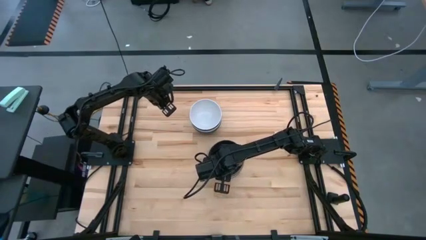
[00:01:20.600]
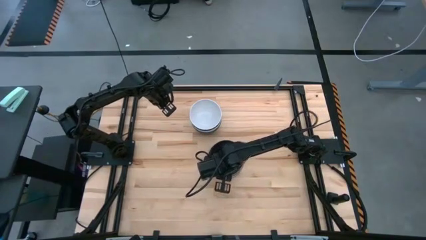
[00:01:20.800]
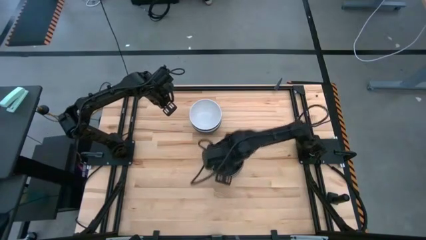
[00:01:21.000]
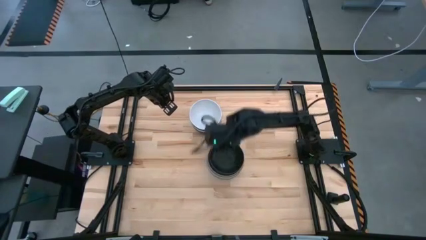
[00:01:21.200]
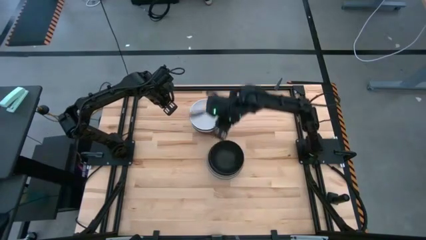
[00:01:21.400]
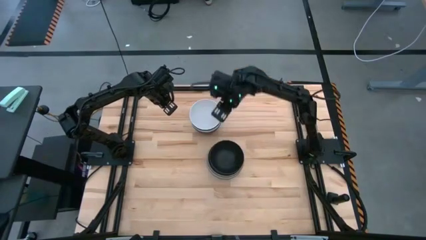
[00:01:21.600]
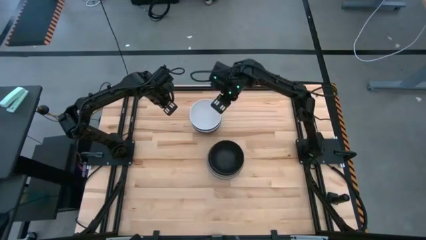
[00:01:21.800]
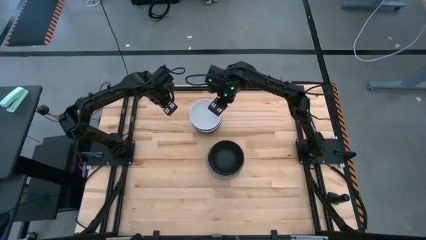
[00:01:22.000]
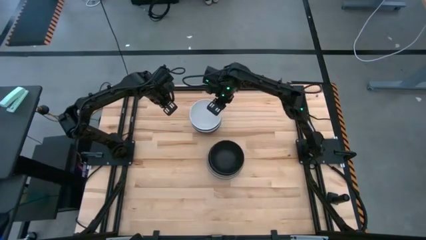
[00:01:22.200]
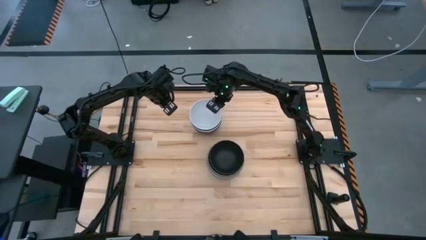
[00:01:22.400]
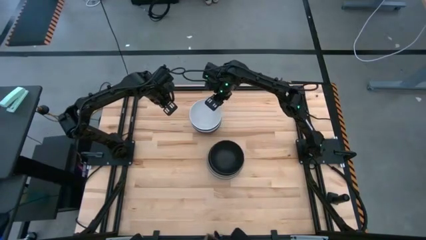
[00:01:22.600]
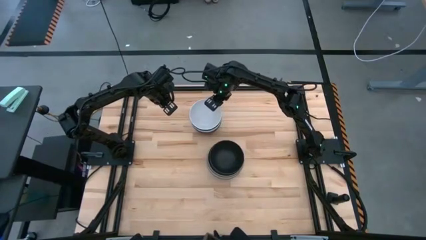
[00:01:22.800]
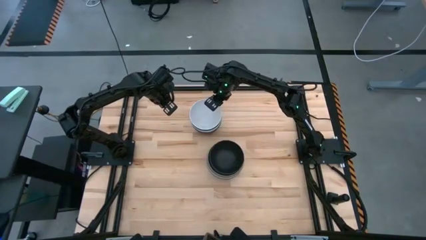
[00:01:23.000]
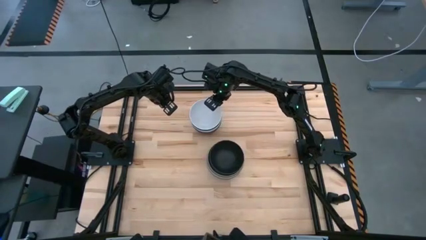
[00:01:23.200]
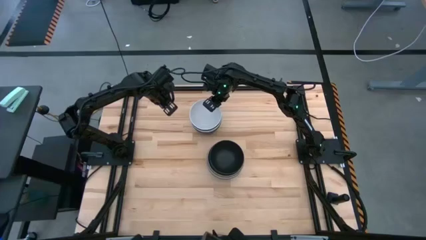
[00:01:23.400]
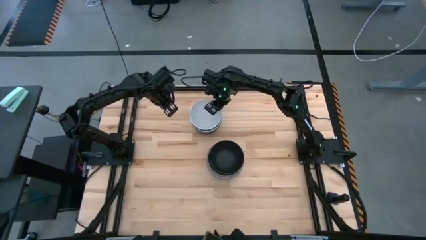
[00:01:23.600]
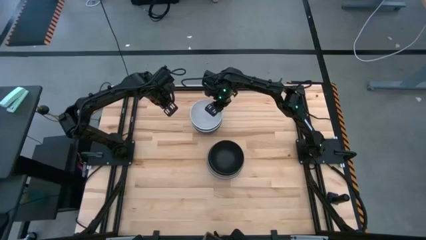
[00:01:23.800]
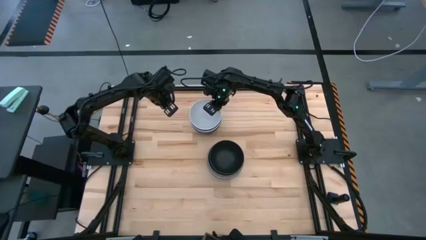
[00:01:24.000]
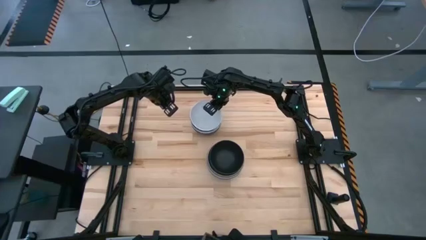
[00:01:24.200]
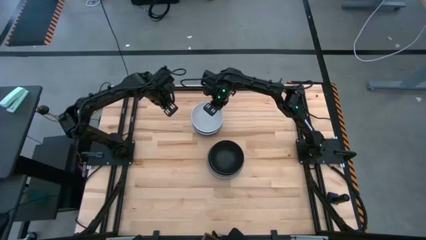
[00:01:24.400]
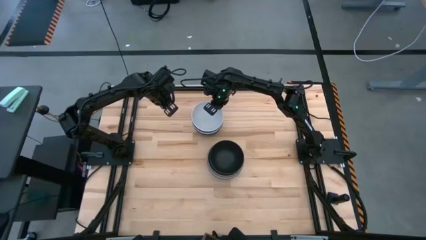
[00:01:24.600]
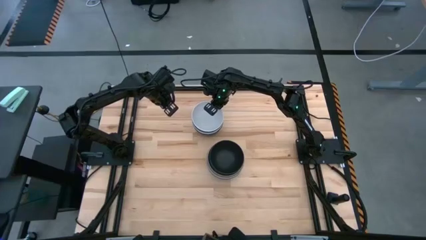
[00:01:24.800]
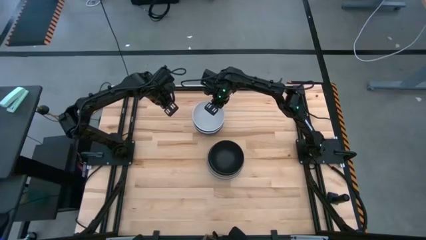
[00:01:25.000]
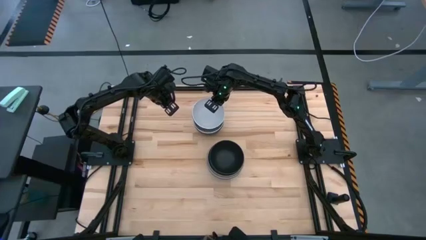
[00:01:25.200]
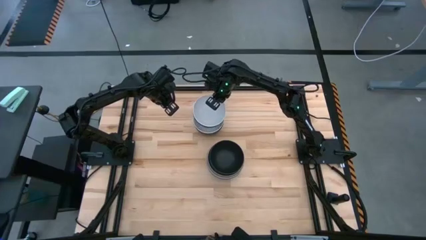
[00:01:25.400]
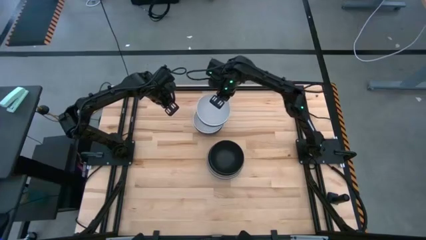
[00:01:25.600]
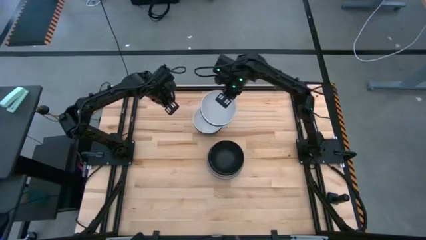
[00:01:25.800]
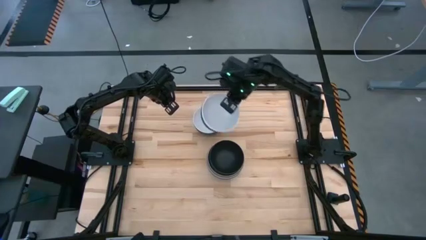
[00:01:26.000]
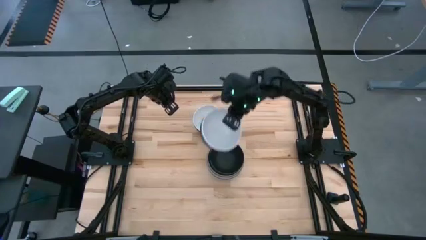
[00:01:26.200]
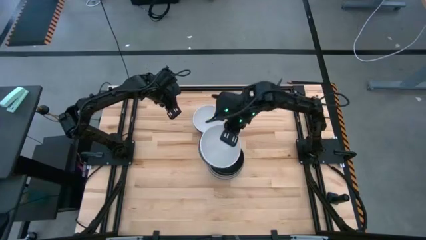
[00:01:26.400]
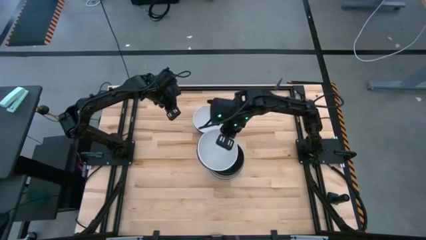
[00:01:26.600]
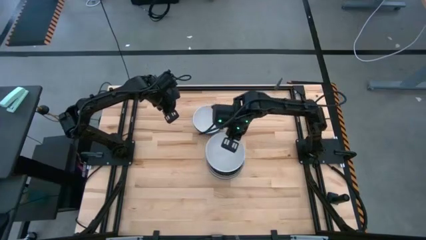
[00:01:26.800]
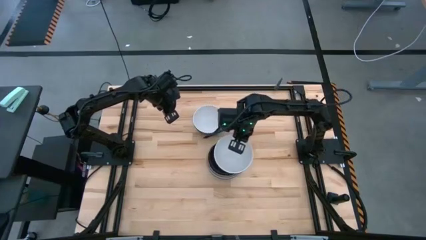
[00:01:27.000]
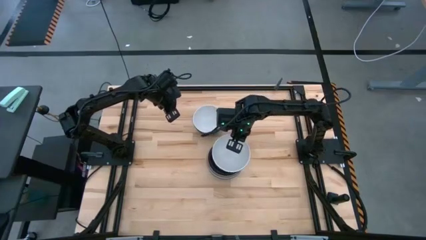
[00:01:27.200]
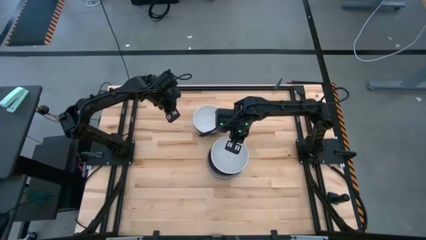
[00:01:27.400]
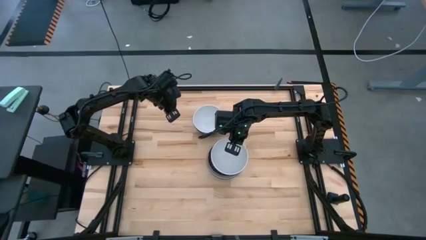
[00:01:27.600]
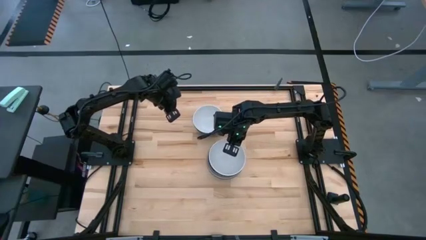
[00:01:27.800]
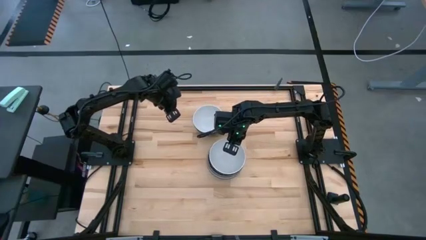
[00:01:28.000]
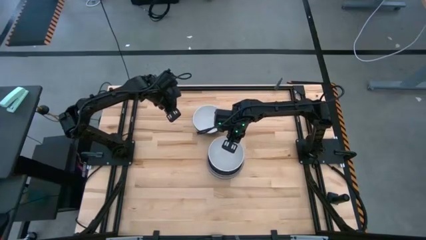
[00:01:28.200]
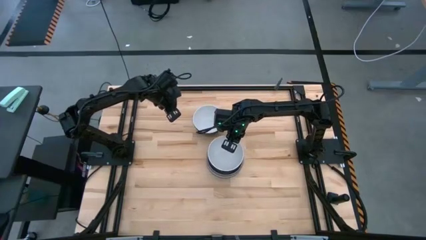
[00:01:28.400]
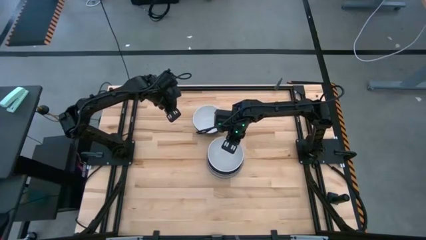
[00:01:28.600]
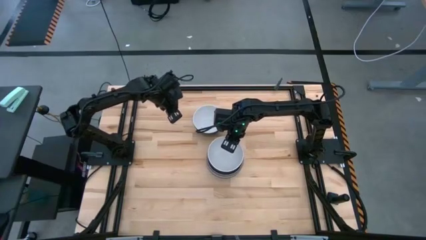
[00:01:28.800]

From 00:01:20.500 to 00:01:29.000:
Task: Nest bowls inside each other
Stack the stacked bowls on top of the stacked bowls

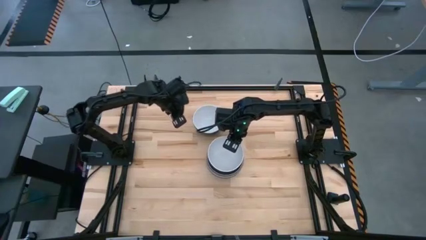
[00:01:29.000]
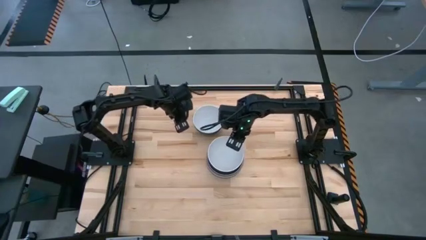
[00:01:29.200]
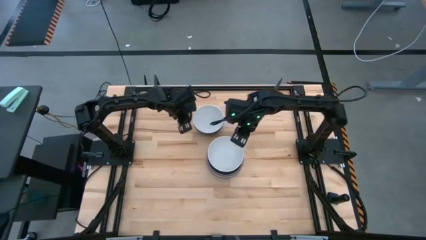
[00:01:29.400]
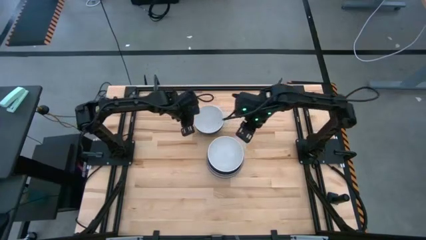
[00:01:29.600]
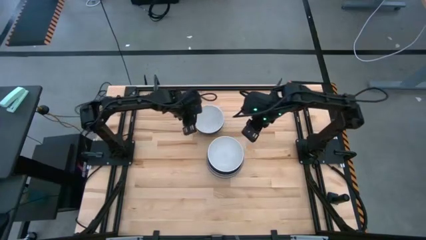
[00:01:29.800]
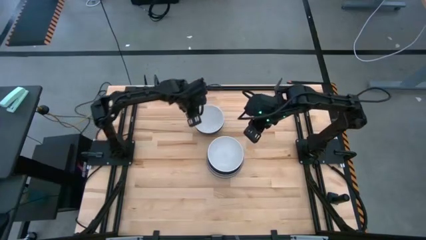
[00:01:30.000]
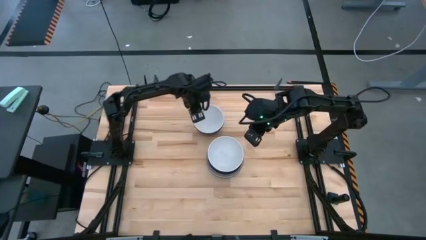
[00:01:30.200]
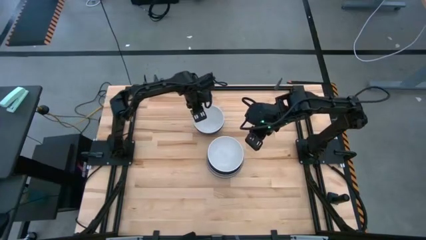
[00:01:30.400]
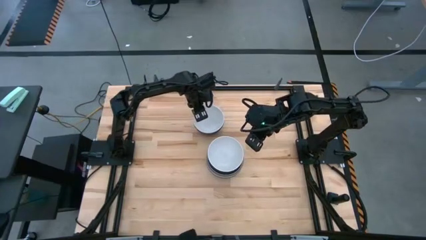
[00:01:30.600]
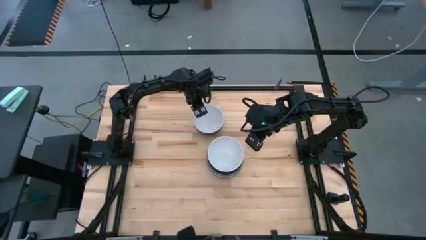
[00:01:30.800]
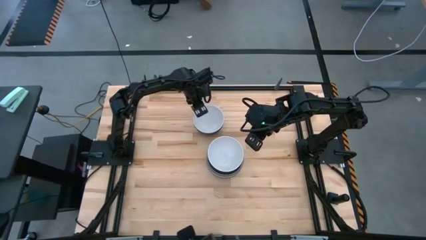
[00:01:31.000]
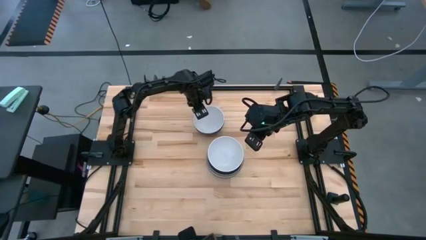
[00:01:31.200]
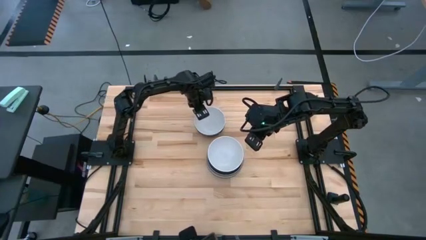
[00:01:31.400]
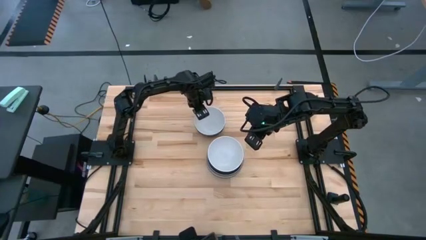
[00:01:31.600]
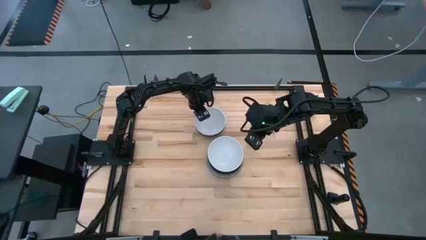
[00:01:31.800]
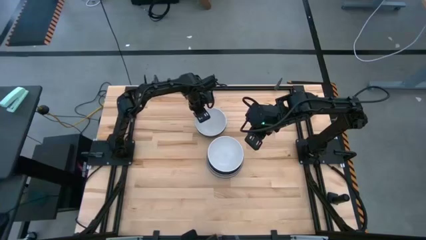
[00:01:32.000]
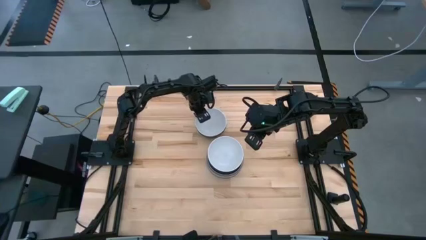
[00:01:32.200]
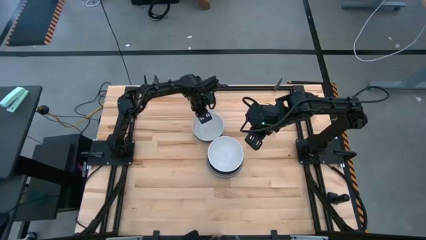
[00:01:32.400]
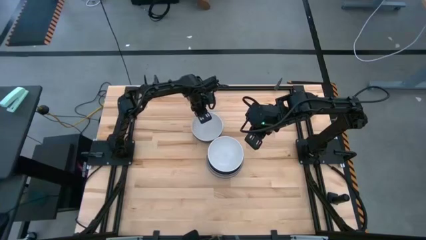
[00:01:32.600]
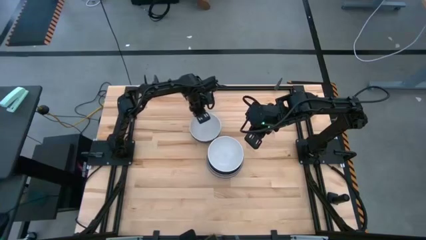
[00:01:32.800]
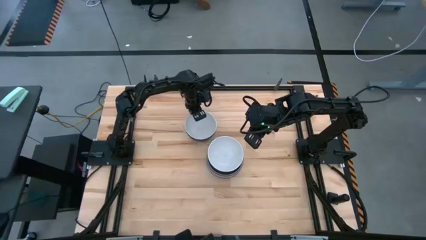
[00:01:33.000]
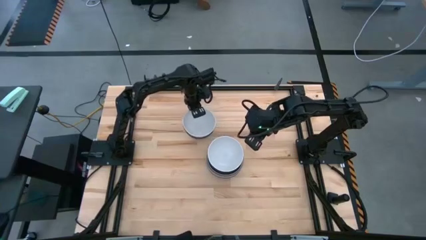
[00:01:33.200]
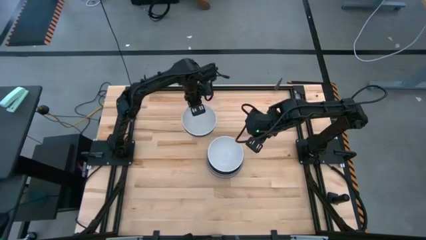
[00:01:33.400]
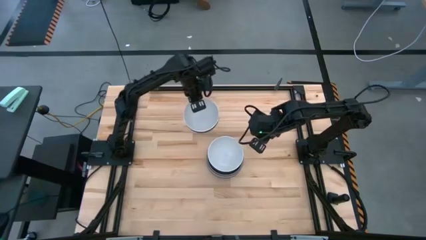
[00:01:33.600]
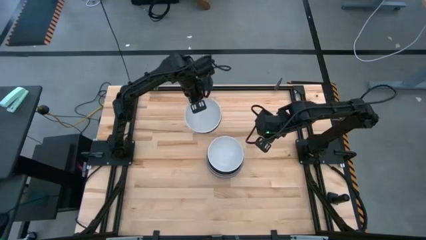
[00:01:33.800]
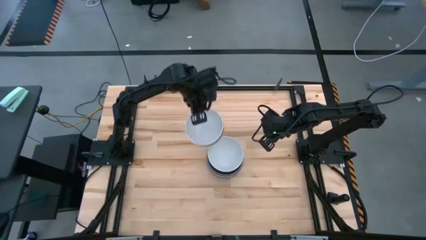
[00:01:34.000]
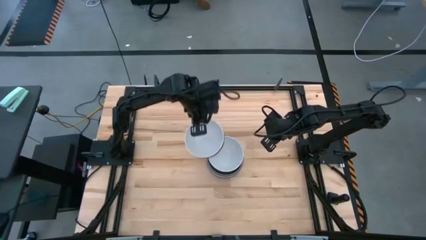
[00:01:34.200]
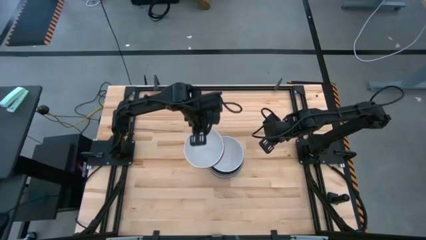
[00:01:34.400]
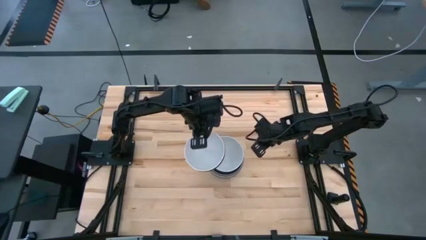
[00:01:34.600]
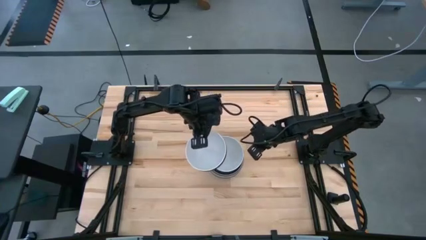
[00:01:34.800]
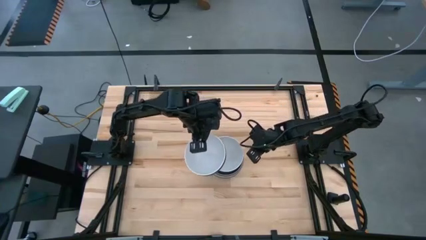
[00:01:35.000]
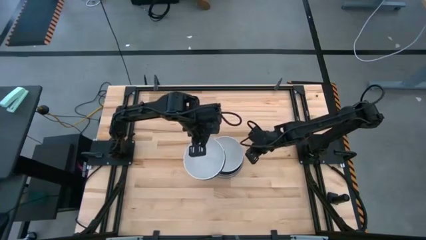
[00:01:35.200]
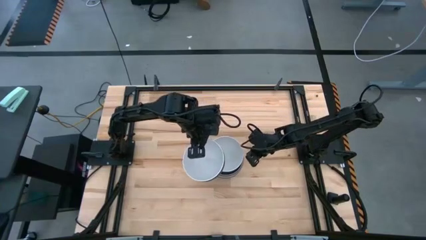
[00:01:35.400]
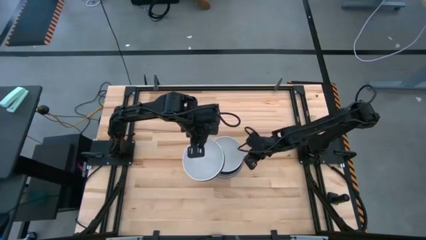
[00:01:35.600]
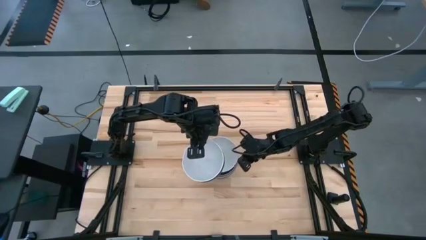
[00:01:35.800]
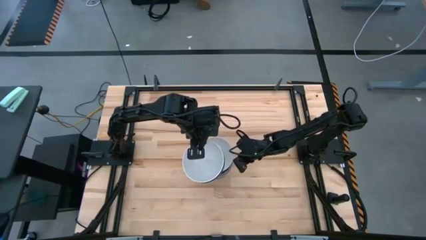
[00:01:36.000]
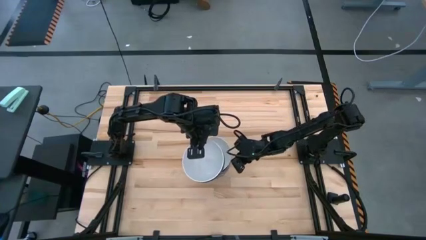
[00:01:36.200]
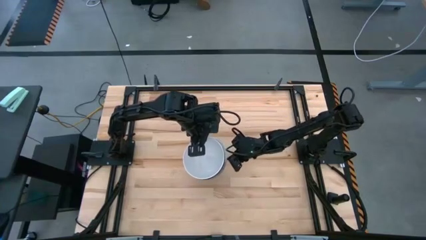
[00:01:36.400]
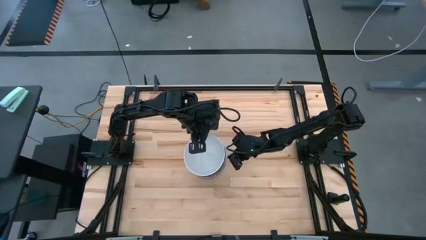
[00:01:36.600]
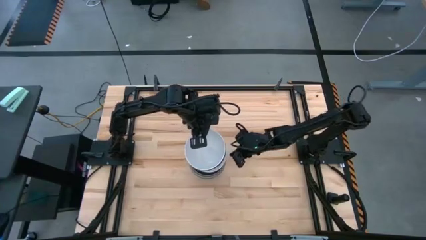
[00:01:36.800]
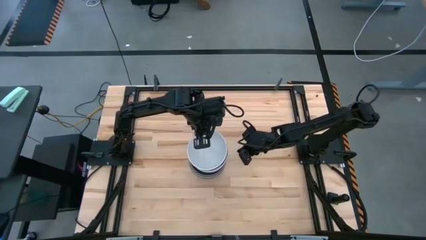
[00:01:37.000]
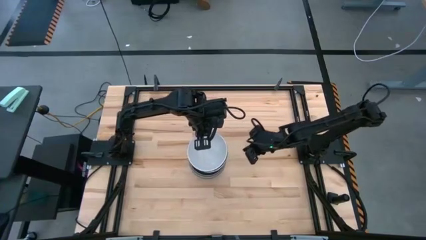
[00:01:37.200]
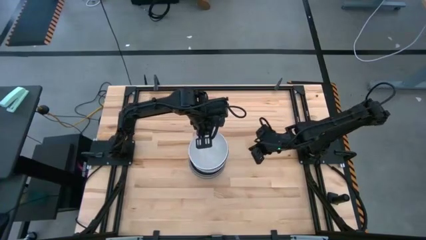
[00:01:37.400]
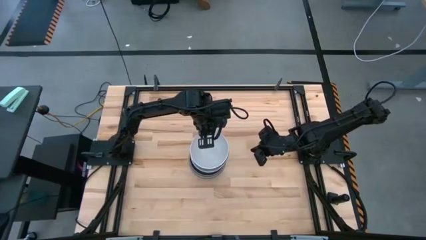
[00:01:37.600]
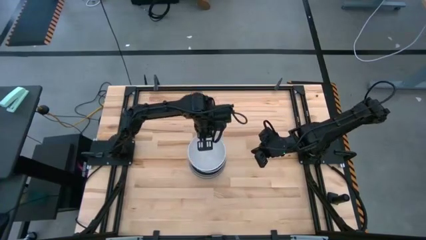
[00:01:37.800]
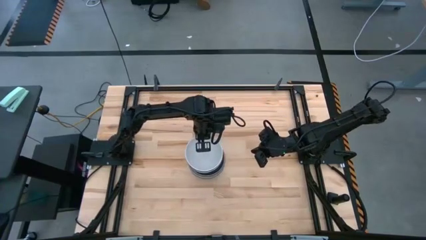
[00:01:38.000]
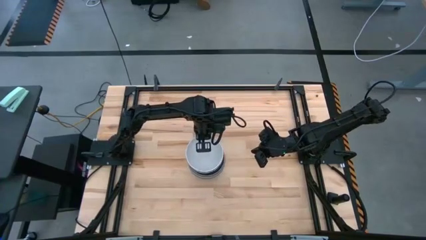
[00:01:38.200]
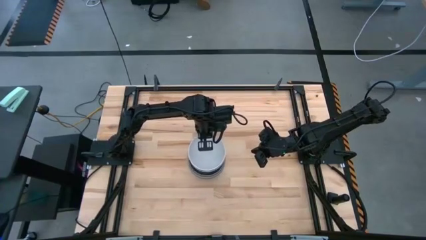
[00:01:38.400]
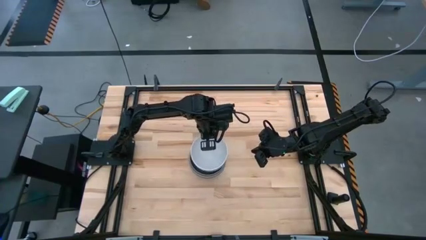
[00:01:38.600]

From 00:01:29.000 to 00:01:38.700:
Stack the stacked bowls on top of the stacked bowls
